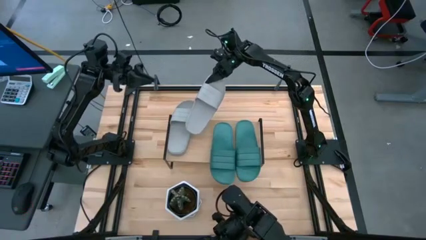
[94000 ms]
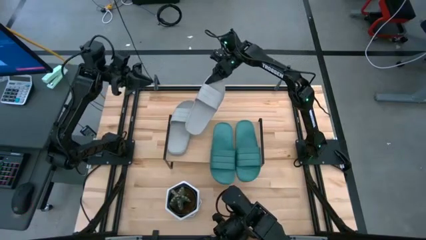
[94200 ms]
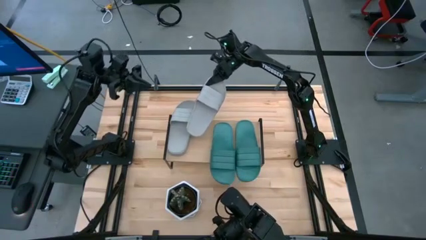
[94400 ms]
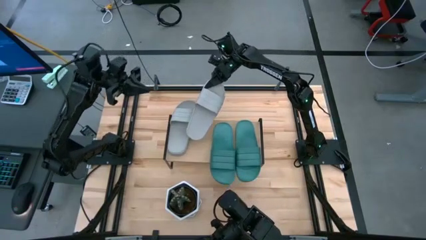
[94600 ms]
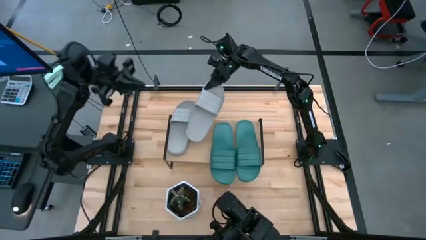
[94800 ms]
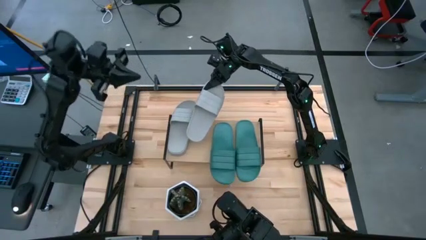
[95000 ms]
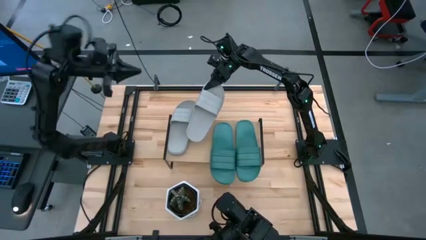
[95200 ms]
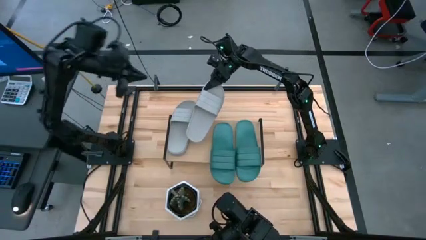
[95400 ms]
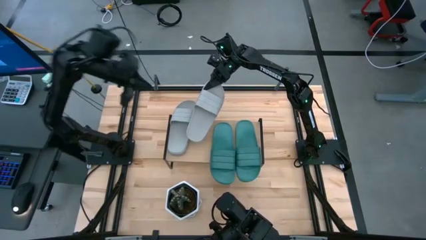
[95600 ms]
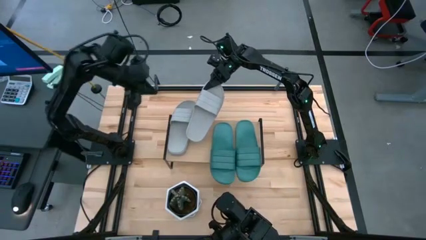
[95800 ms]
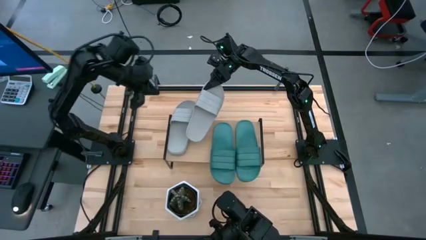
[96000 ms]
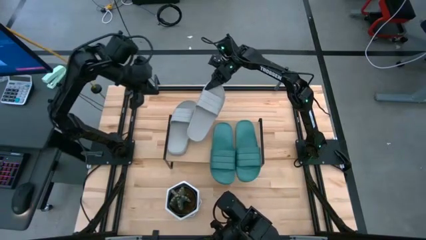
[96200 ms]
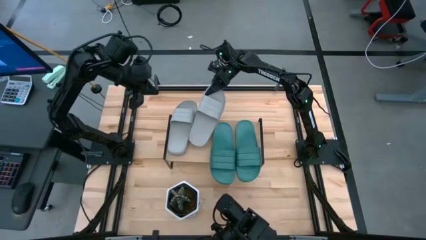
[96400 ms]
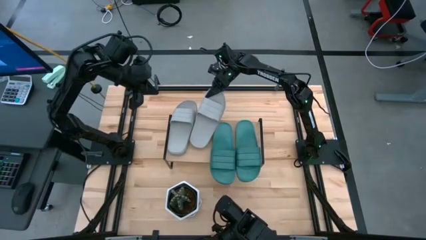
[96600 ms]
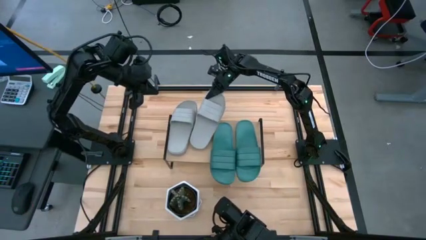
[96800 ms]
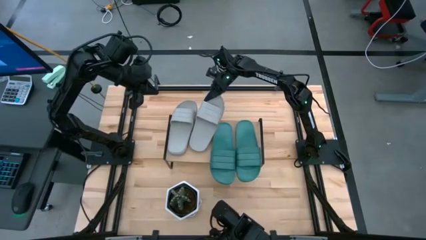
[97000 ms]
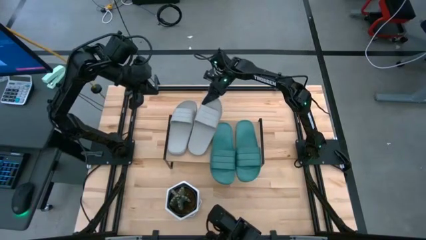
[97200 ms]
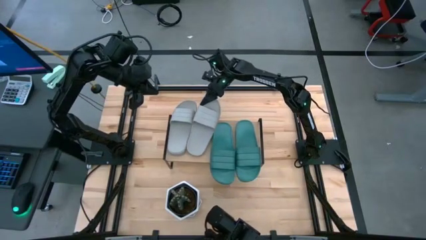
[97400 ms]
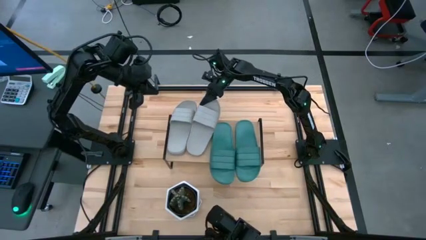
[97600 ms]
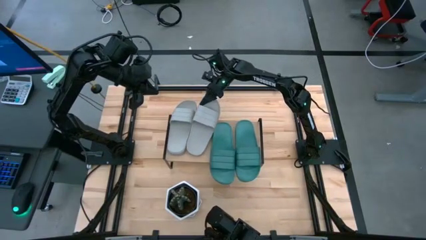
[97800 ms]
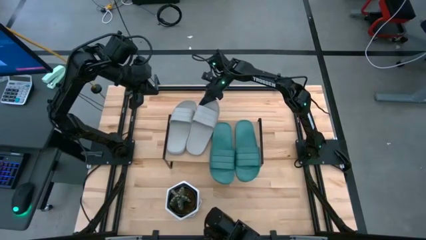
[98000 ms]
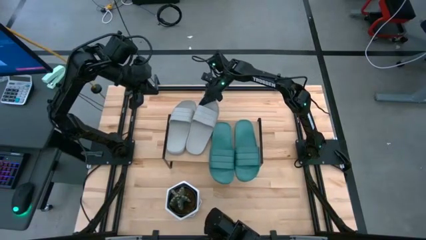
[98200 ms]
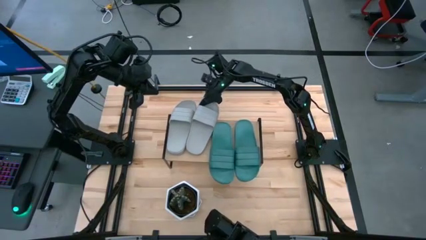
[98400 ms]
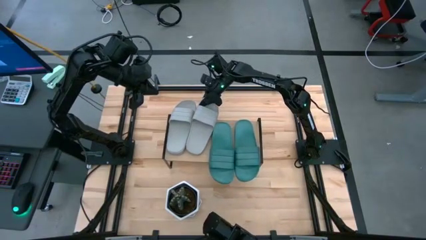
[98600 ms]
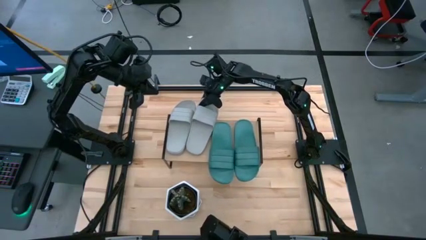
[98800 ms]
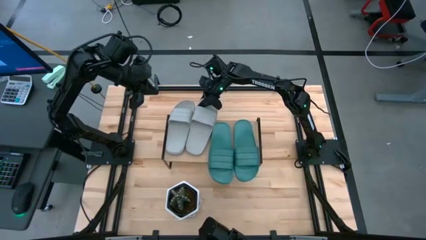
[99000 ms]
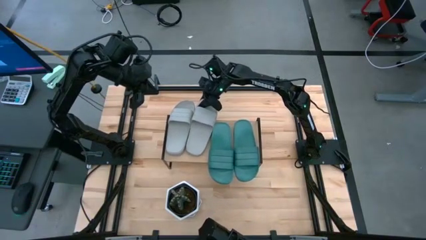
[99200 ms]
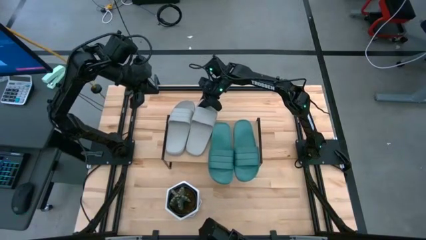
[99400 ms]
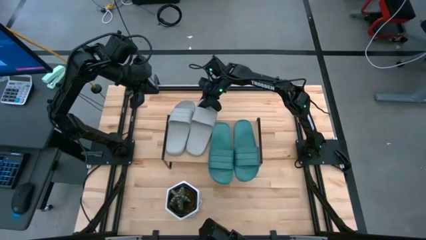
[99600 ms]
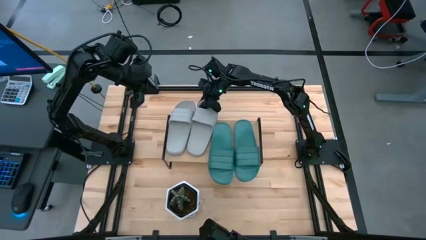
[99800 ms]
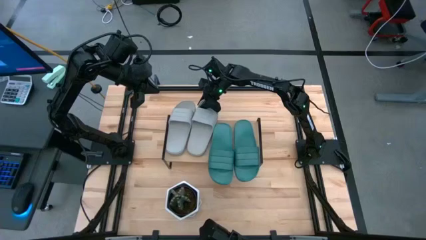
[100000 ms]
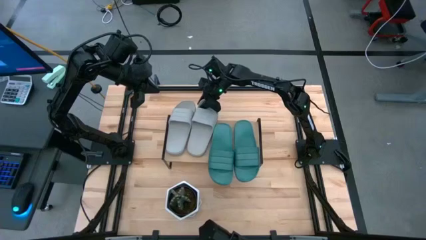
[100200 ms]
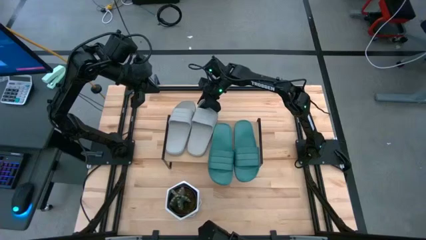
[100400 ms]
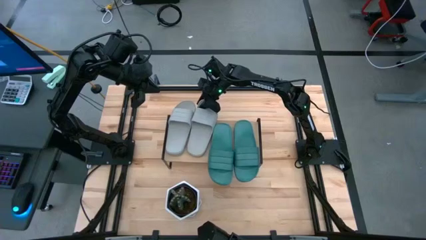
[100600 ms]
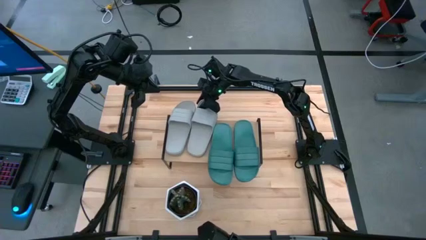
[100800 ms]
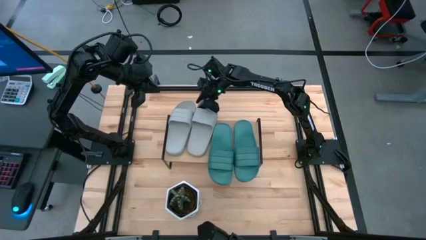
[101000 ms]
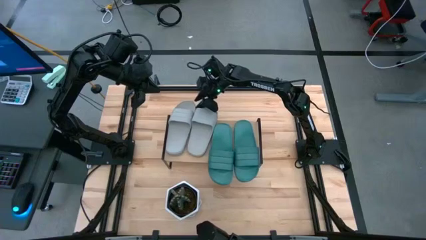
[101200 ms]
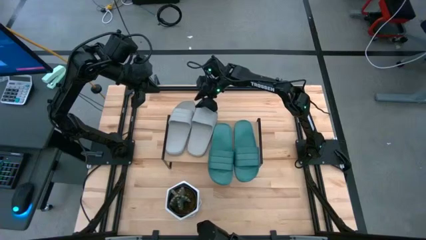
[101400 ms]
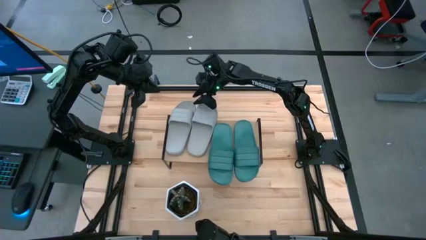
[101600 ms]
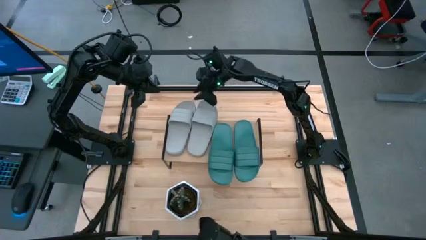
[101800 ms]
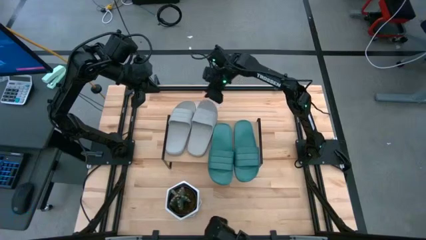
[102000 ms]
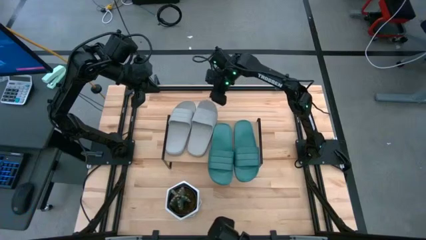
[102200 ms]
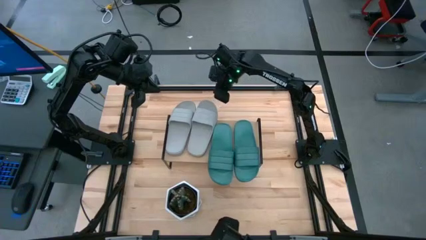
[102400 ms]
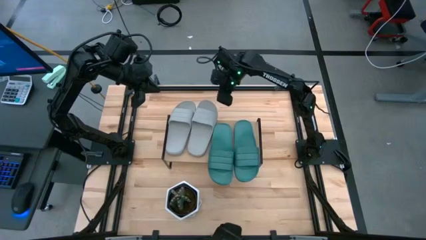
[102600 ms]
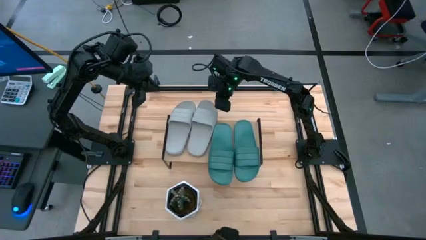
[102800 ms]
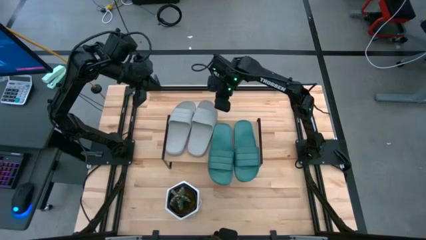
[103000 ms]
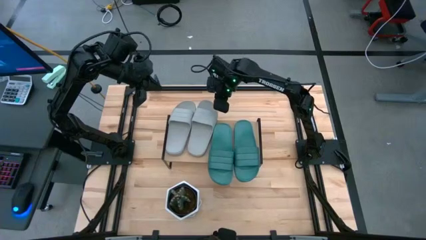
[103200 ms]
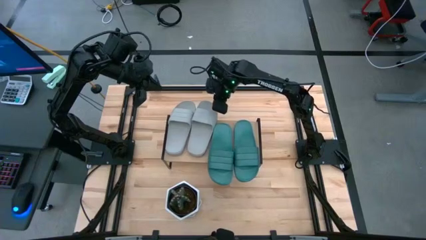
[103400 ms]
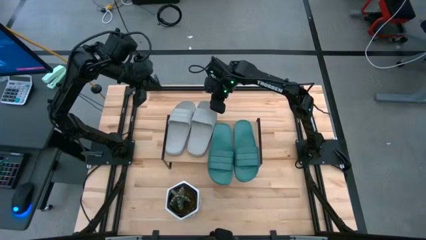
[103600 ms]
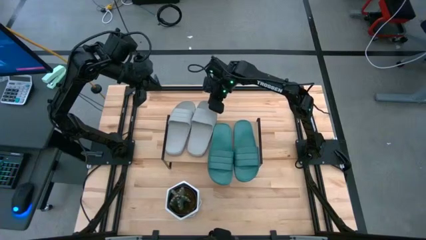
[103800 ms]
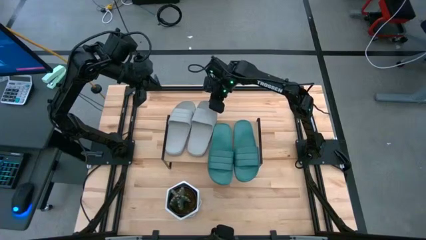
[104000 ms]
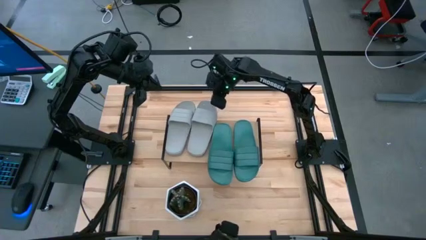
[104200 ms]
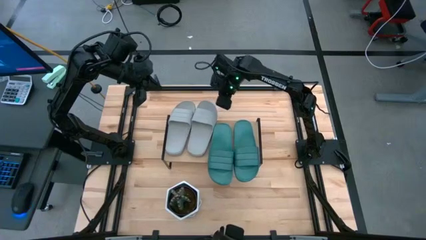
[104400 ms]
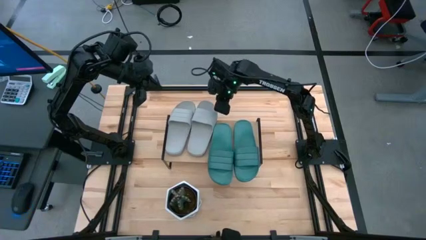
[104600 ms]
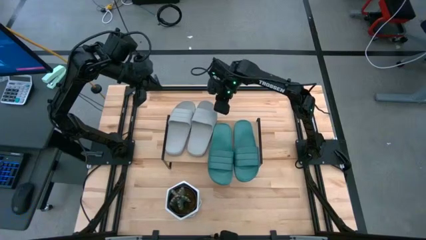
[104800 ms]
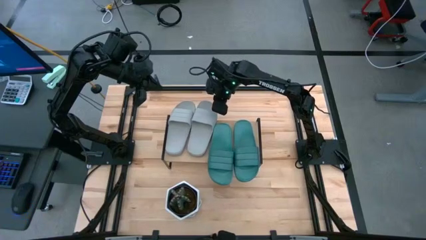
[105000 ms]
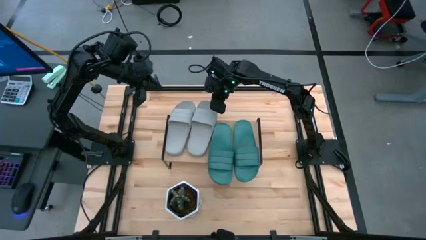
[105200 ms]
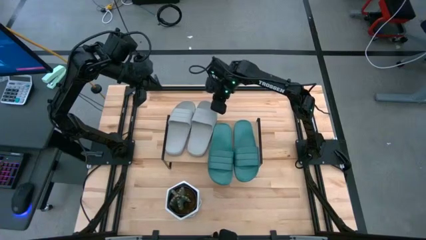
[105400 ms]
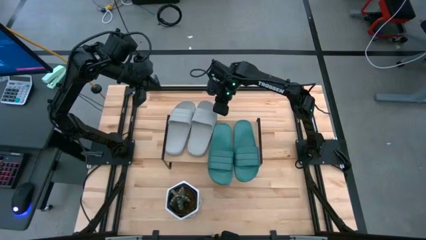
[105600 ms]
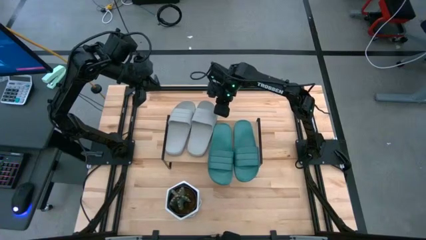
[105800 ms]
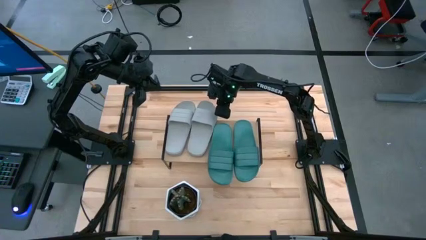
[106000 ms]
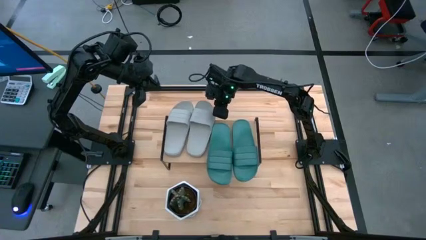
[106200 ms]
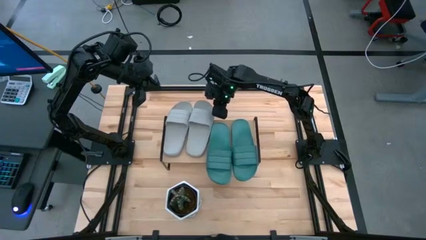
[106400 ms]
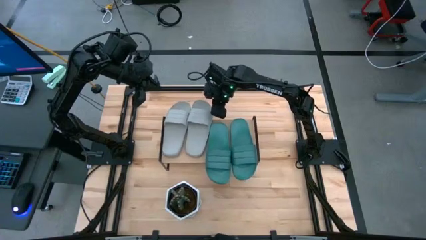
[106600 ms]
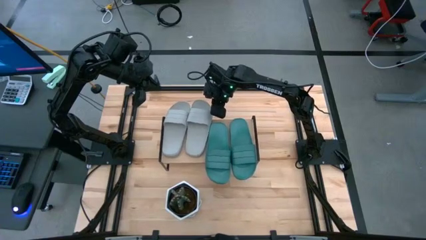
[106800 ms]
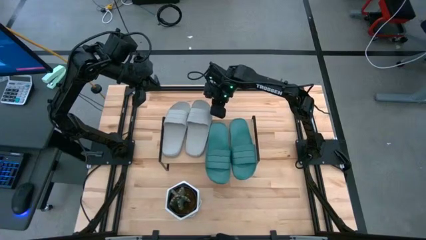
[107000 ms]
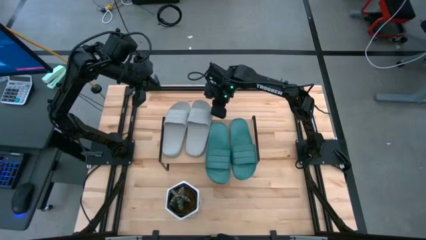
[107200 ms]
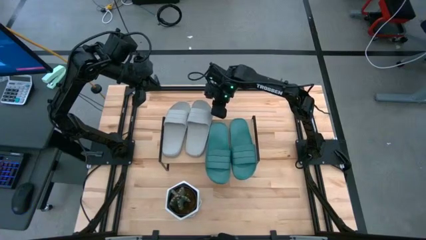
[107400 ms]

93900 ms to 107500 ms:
Task: Pick and place slides into the shelf
Put the gray slide on the shelf

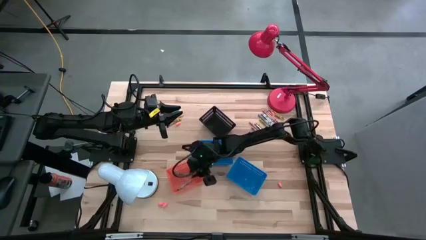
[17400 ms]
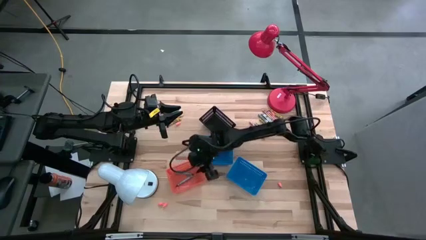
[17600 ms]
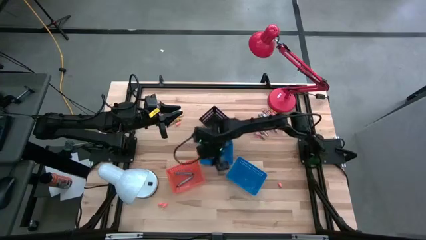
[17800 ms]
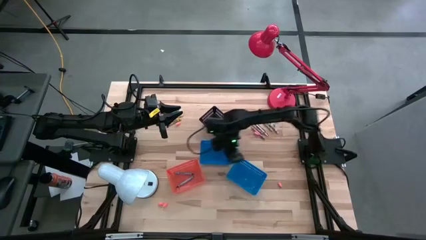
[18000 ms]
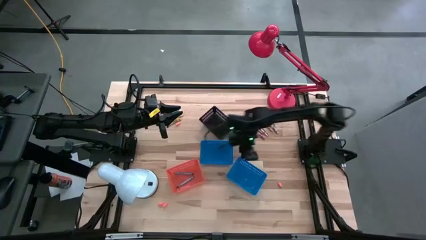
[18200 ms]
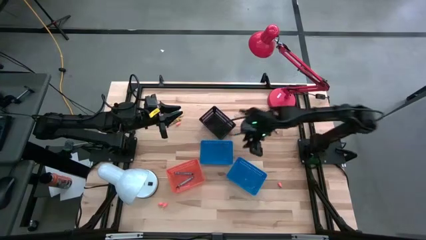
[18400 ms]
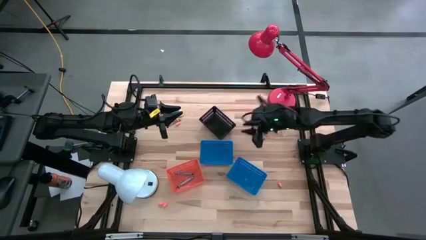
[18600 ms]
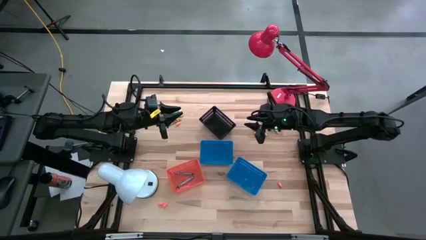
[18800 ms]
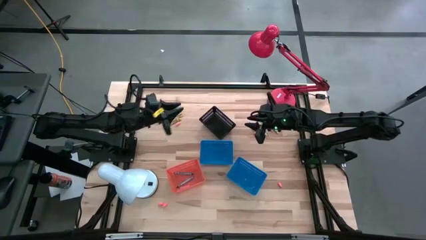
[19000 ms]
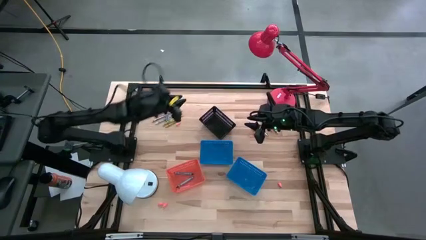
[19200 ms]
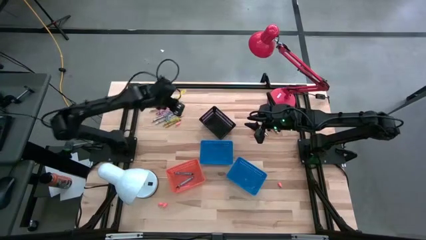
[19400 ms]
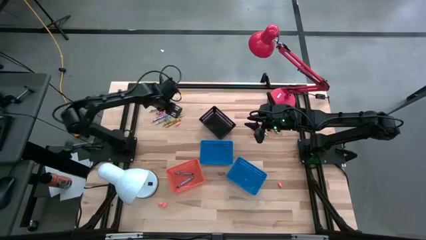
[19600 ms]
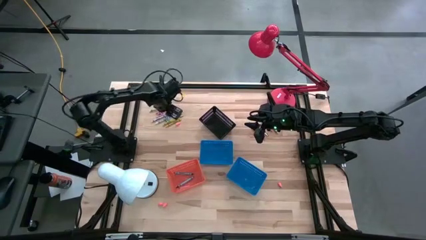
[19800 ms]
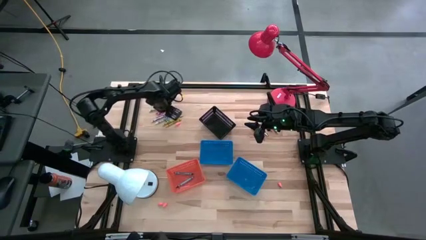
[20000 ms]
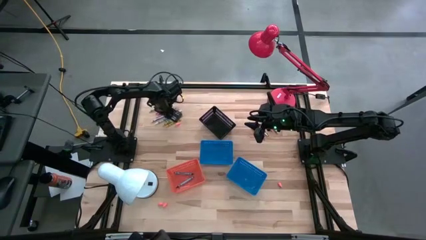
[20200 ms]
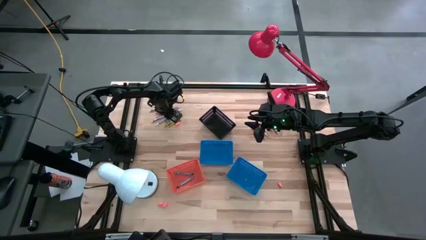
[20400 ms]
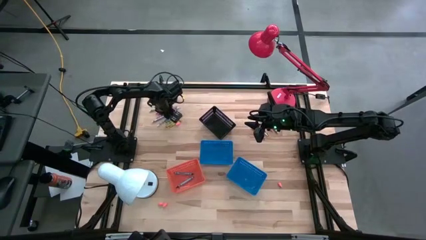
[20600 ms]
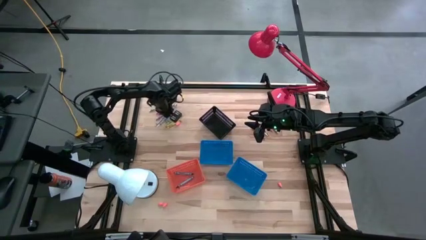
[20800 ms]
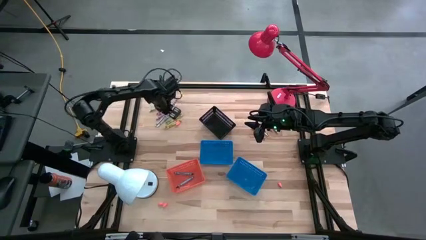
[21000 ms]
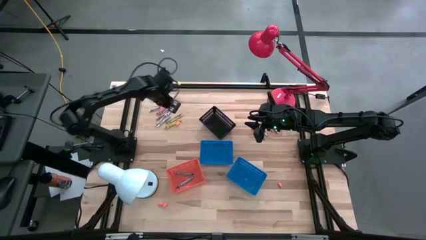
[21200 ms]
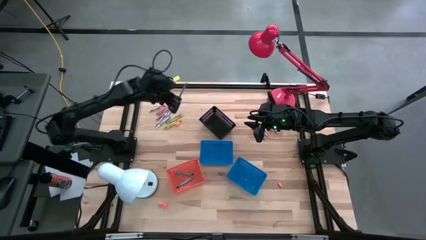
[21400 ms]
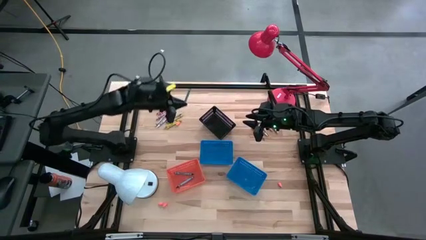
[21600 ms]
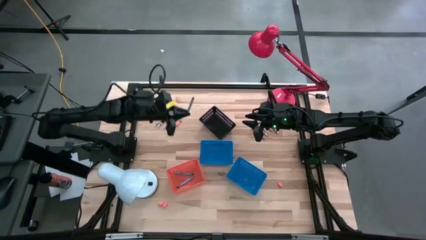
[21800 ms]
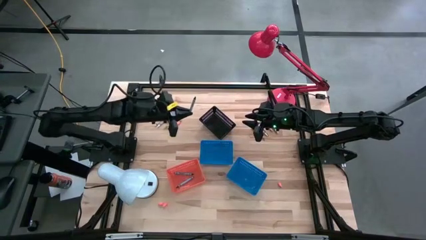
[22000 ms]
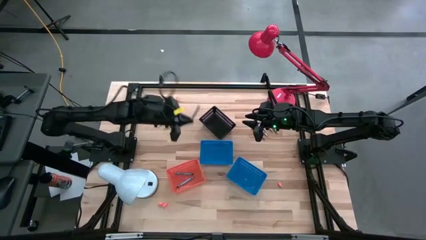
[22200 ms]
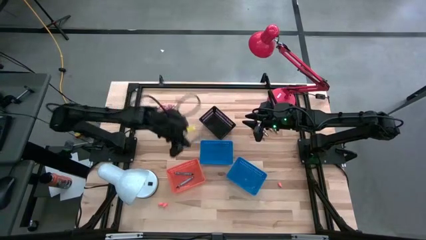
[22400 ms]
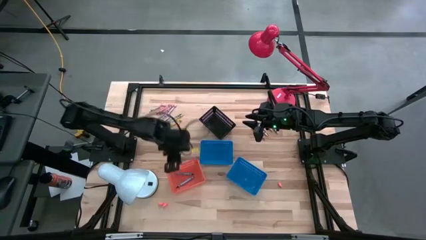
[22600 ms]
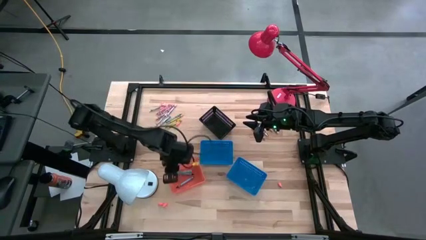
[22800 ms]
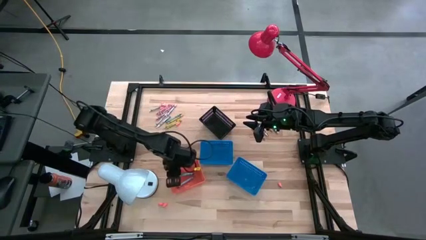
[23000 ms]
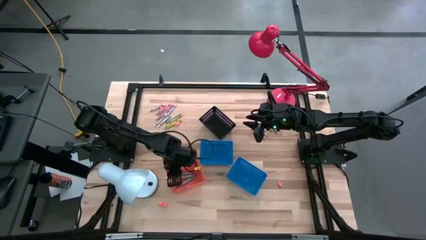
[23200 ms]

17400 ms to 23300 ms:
Task: Sort crayons
Put the blue/green crayon into the orange bin
